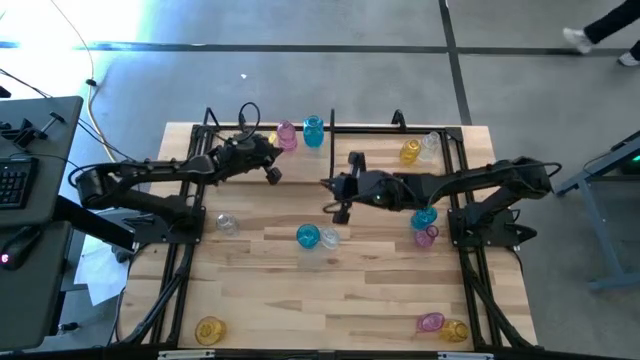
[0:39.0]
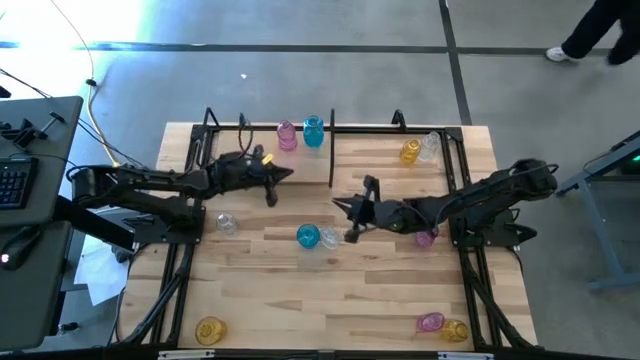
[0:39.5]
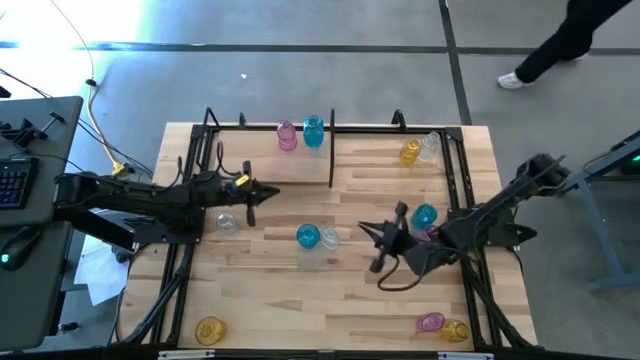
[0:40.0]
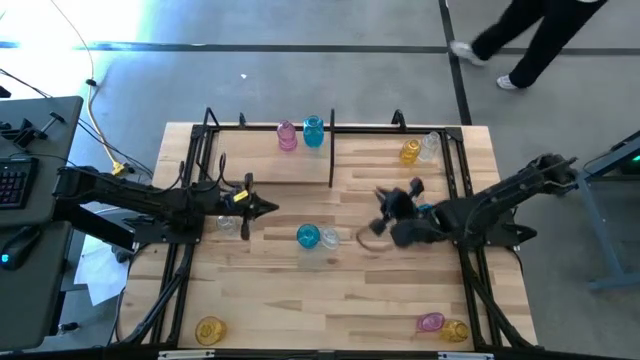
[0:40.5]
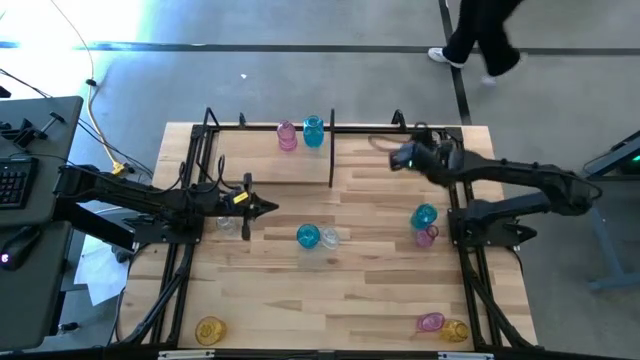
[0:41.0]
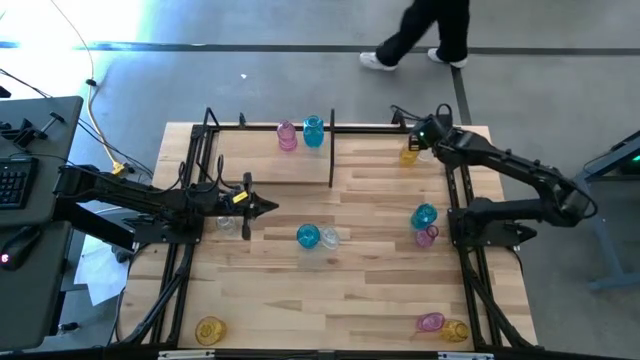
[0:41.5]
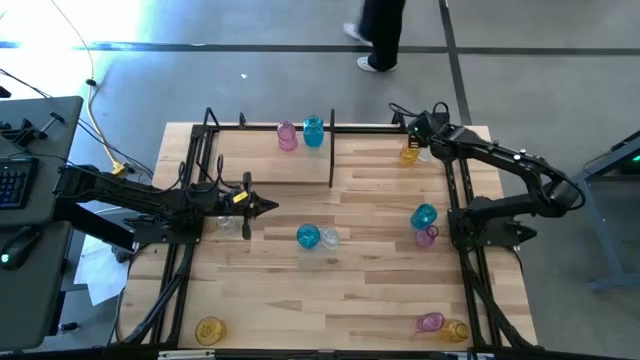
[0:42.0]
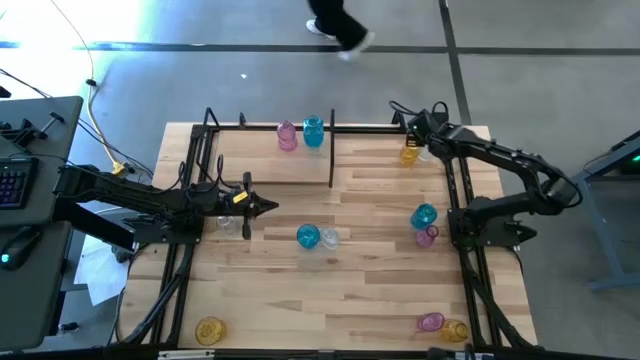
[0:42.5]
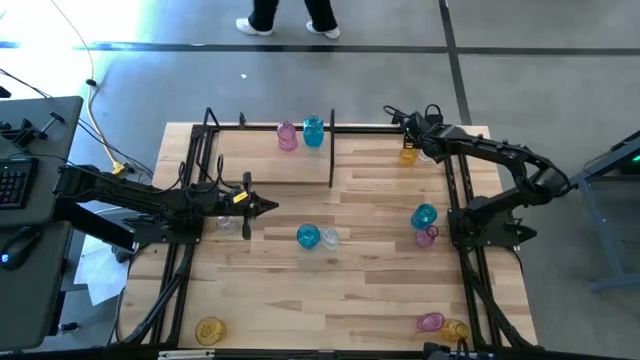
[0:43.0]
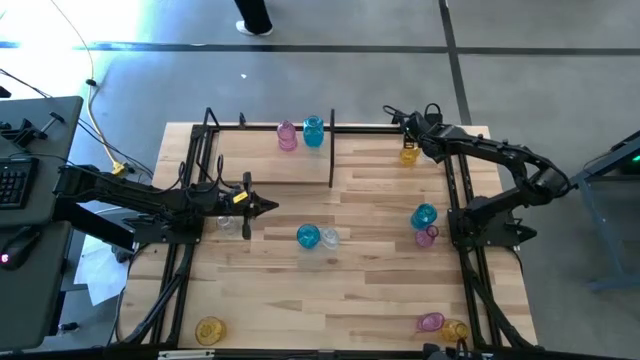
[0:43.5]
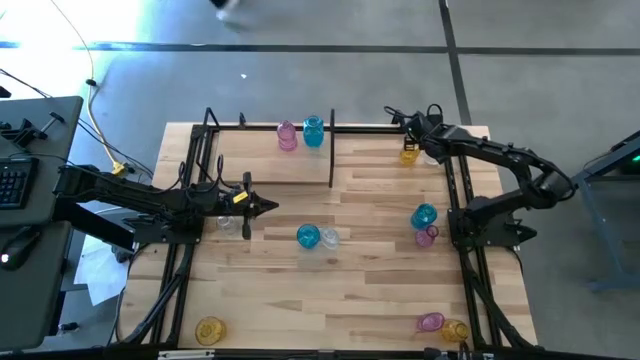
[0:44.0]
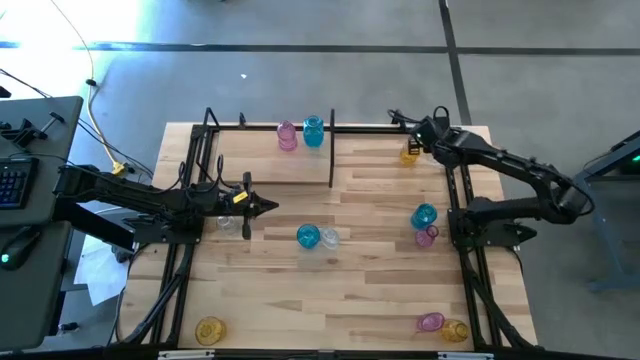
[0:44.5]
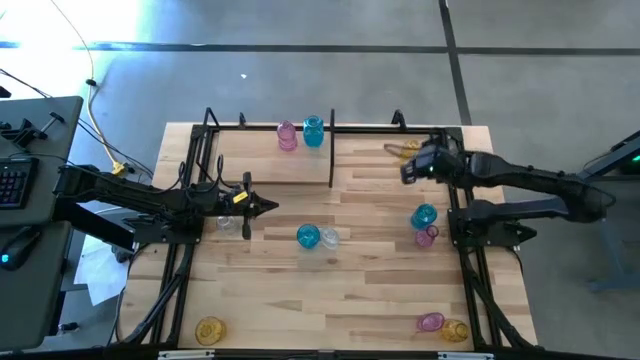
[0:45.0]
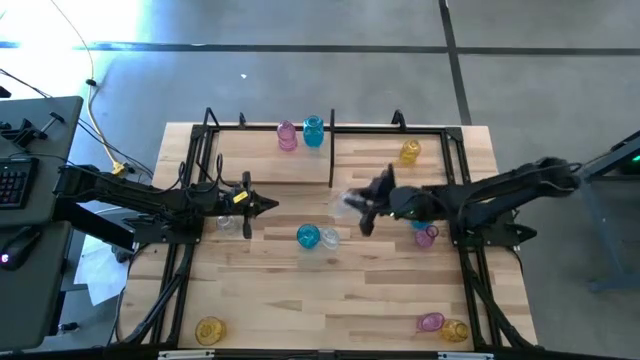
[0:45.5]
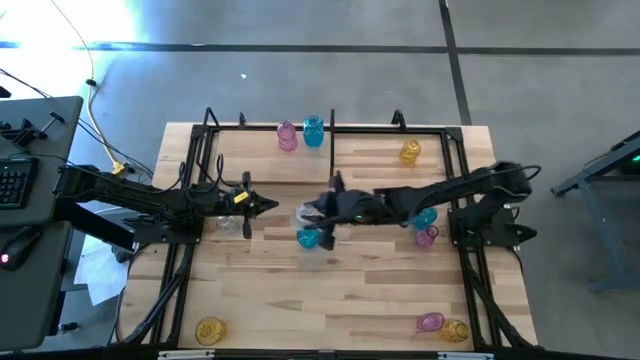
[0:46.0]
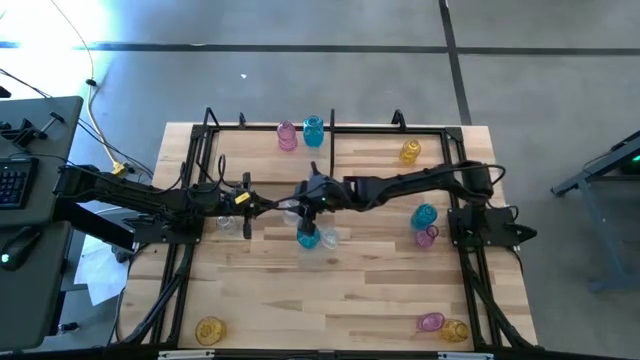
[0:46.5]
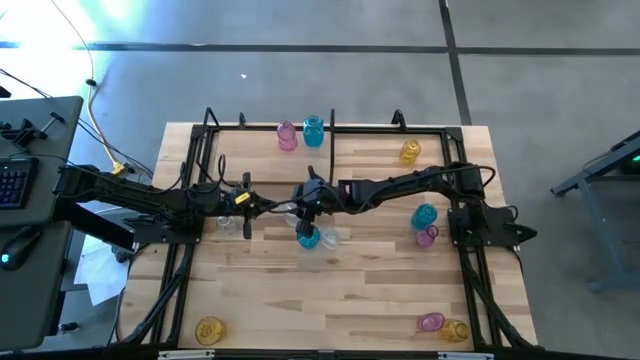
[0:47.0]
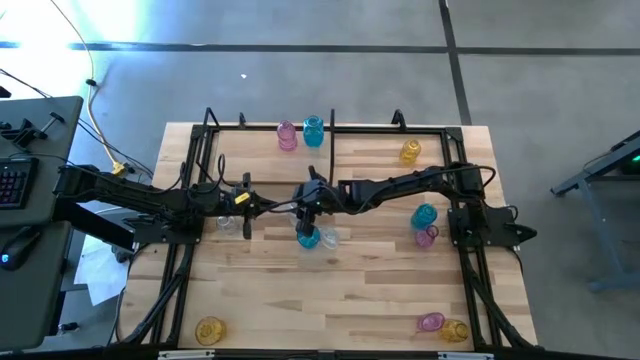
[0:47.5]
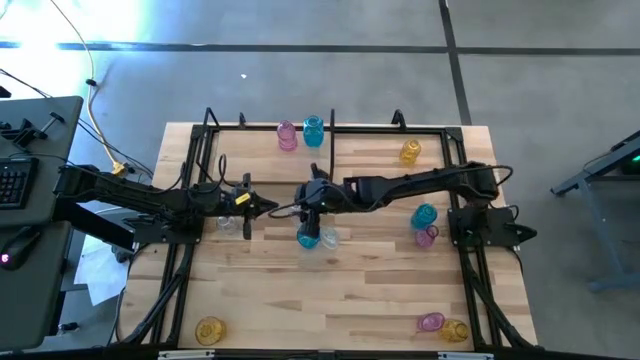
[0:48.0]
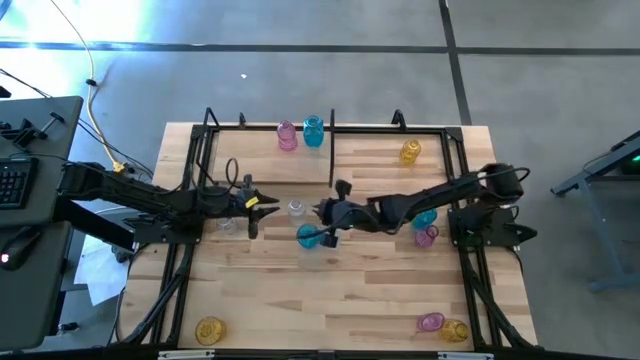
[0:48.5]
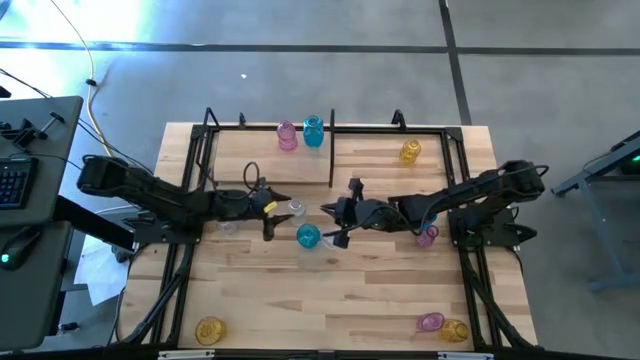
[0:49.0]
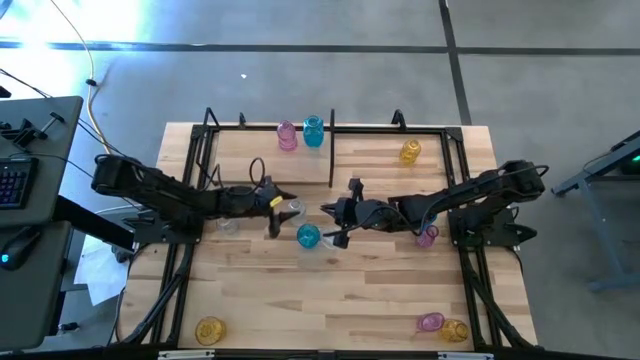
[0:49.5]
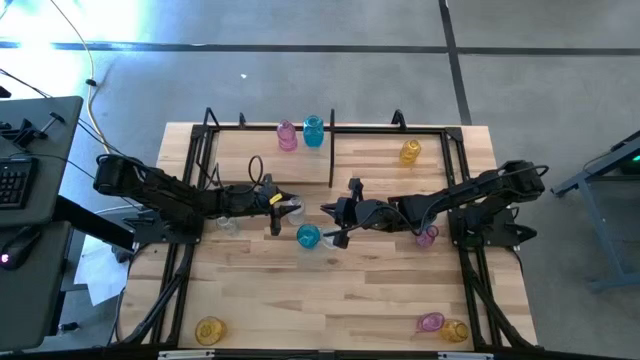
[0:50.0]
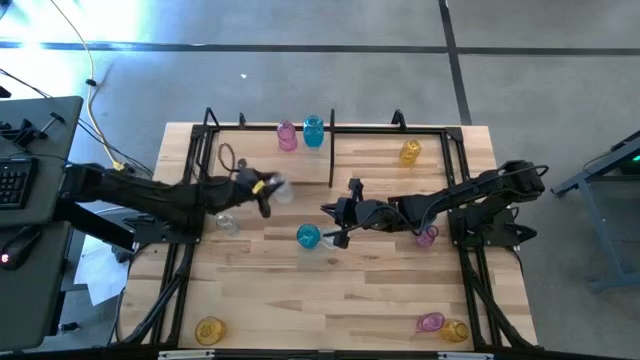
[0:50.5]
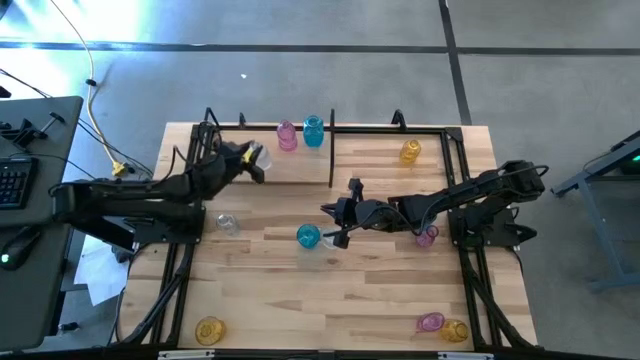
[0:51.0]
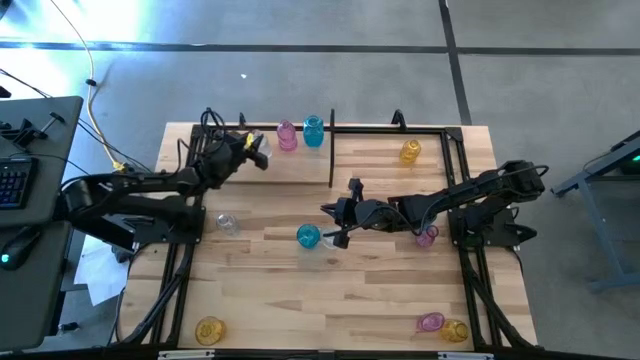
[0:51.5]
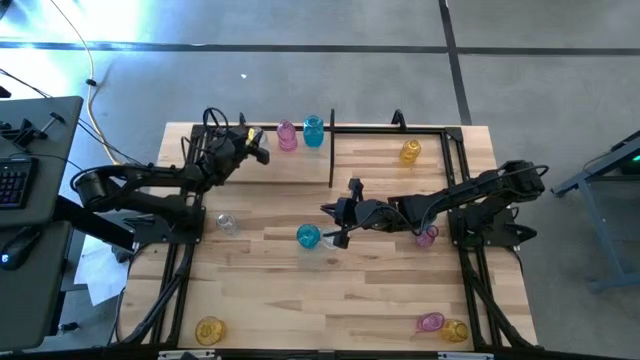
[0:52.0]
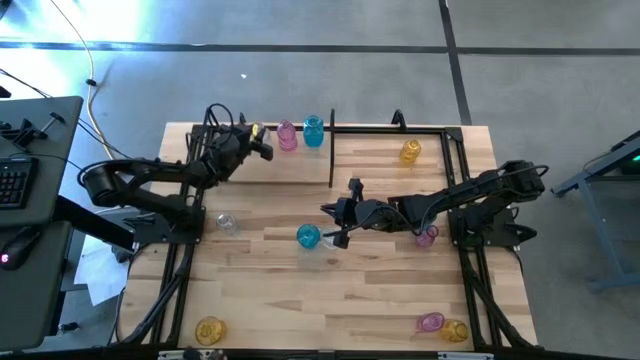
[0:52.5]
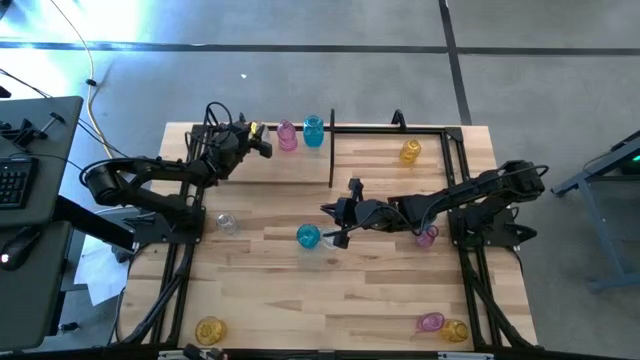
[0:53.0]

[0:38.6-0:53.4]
Task: sort vases onto shelf
Put the top right transparent flower vase on the shelf

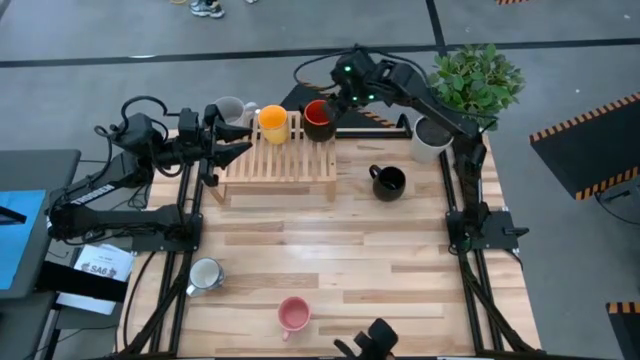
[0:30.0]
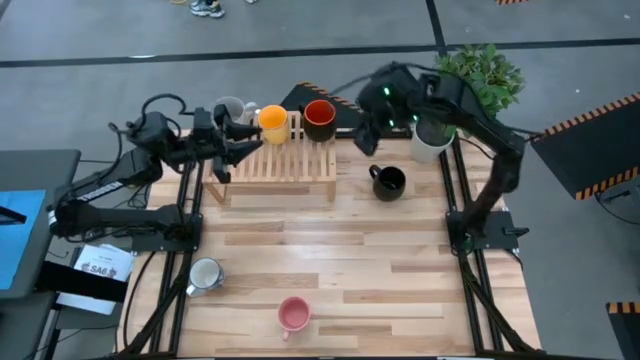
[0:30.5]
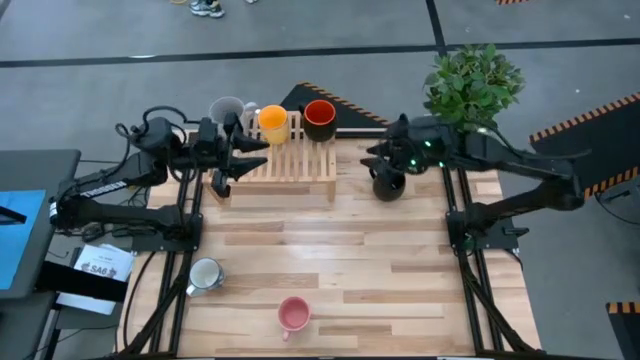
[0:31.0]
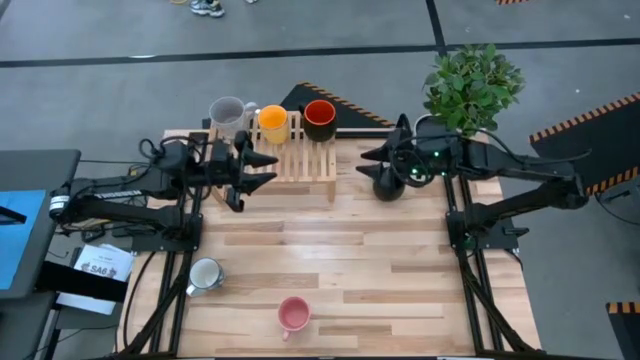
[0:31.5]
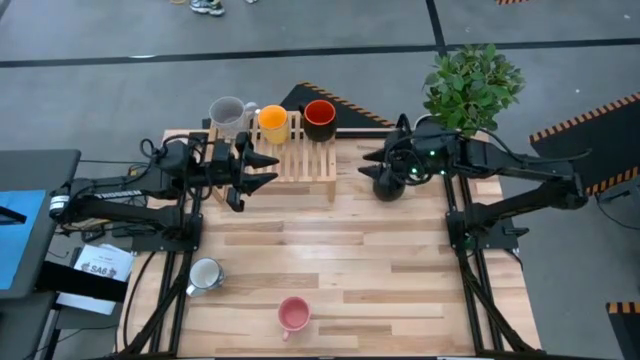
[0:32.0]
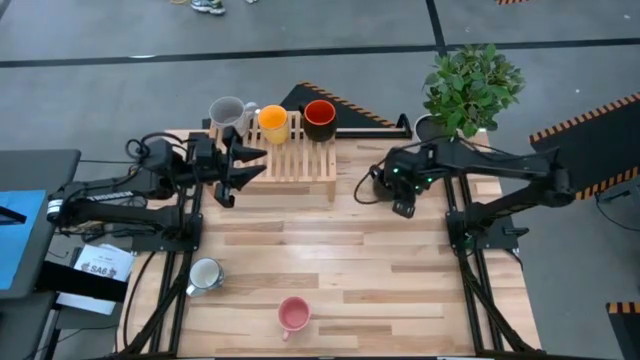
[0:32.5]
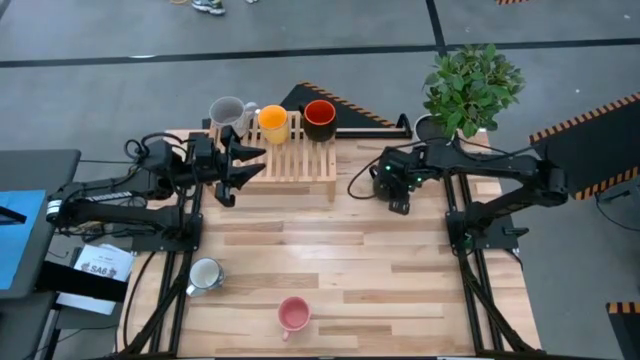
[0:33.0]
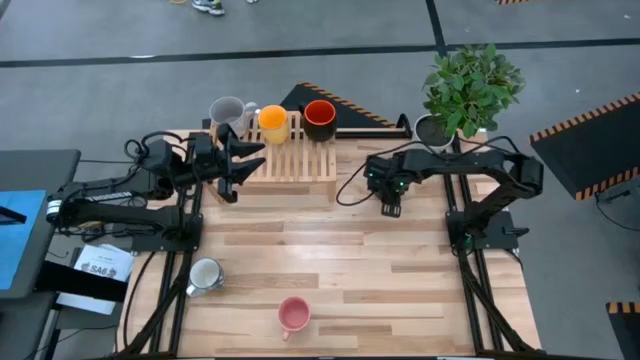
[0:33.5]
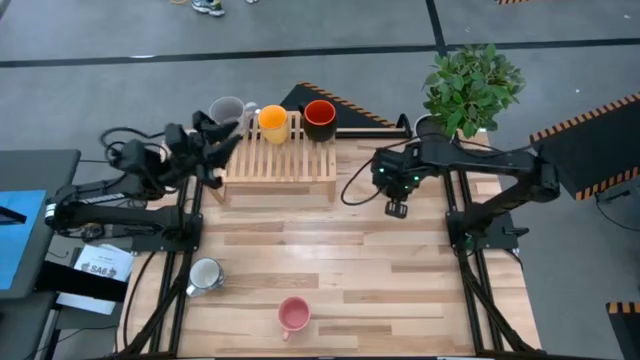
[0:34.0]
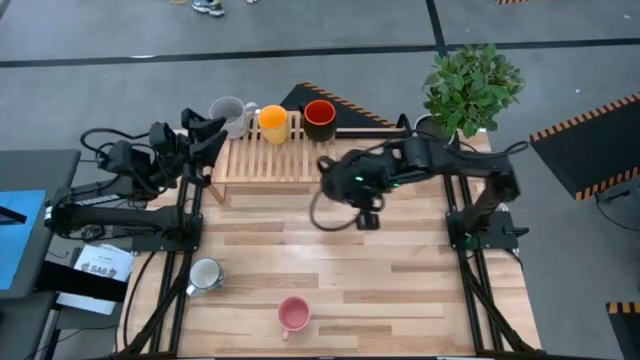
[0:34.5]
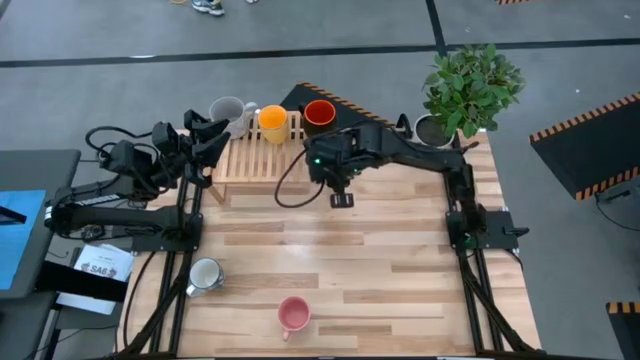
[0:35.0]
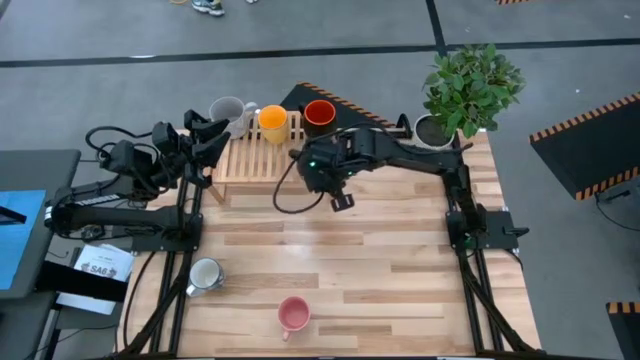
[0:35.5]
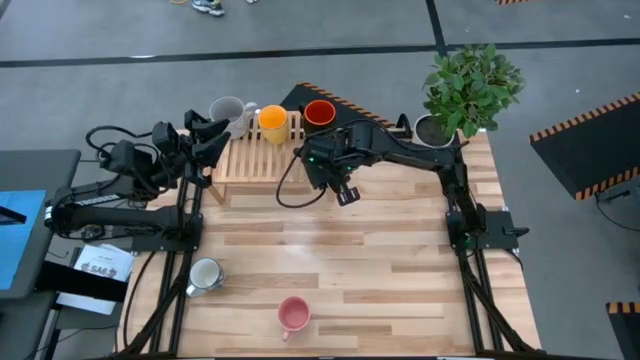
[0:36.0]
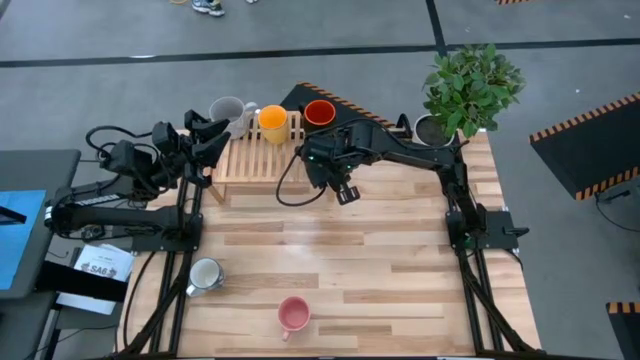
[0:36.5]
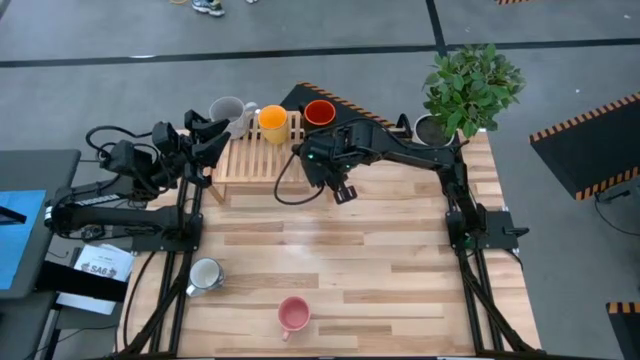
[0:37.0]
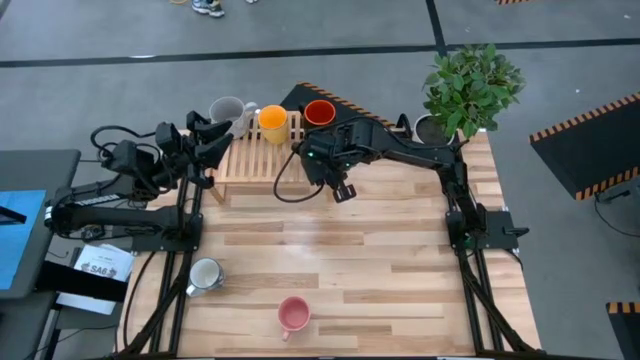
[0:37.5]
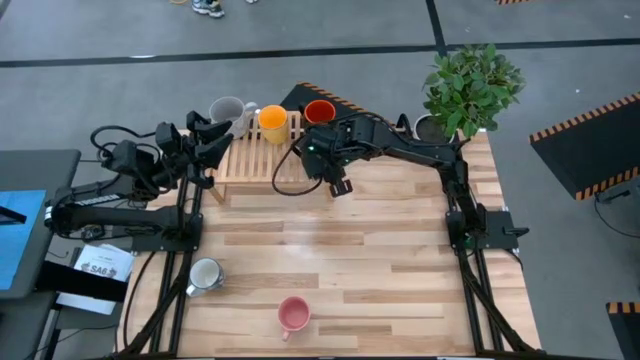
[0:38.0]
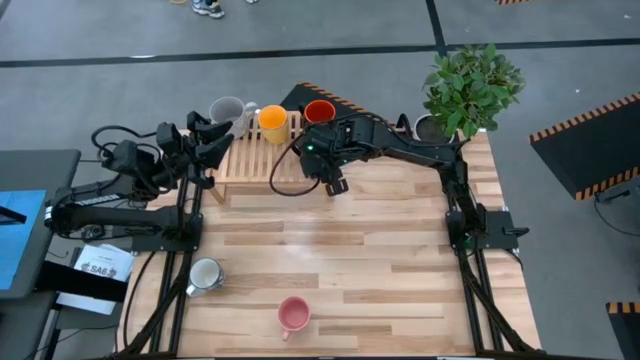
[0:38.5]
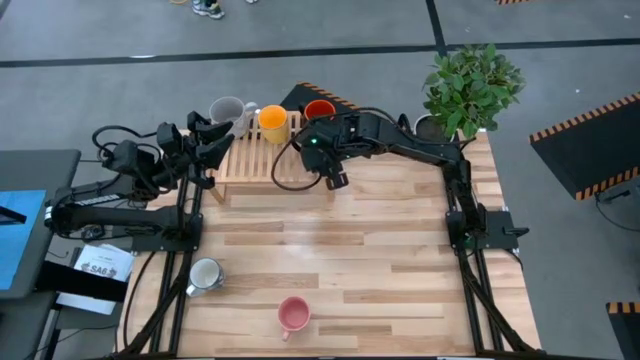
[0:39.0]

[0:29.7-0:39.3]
Task: Place coffee mugs
Put the black mug on the shelf
